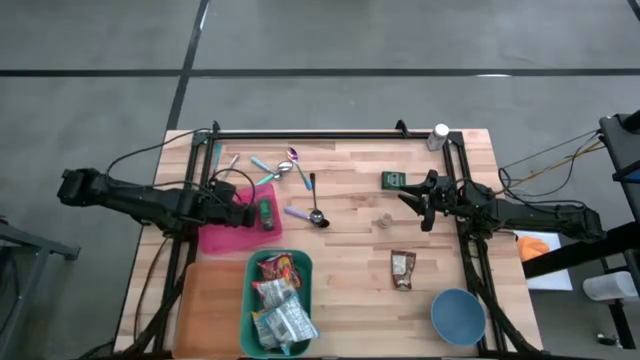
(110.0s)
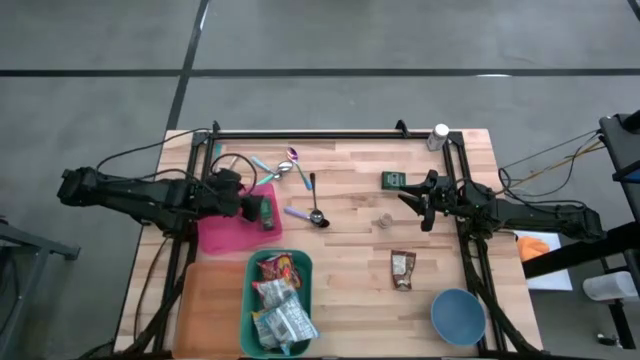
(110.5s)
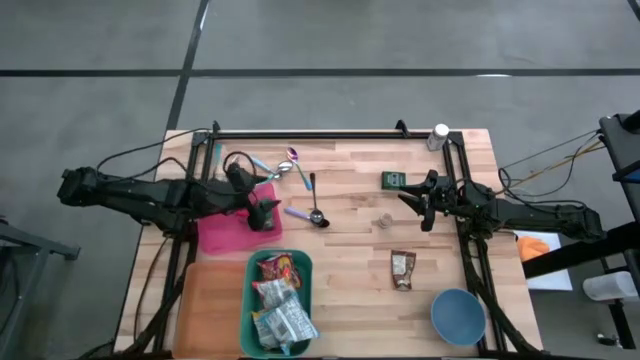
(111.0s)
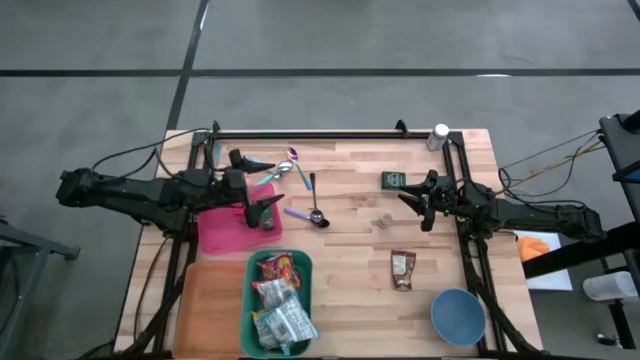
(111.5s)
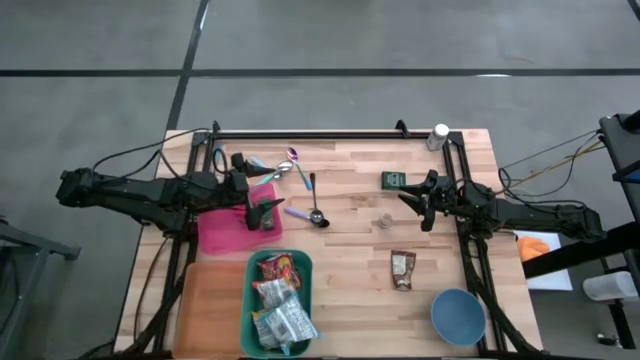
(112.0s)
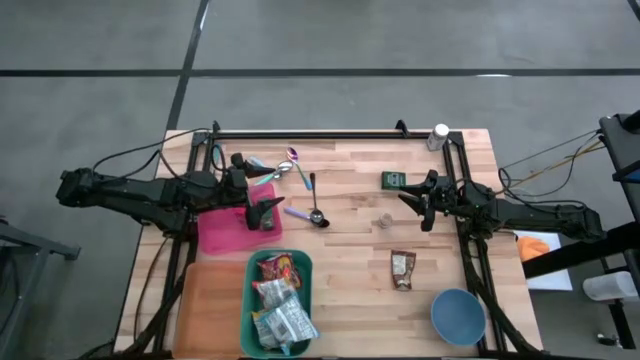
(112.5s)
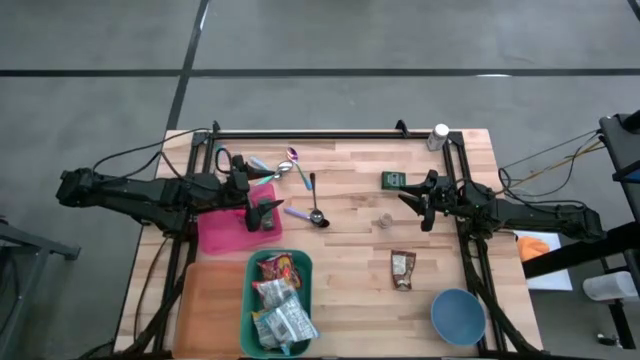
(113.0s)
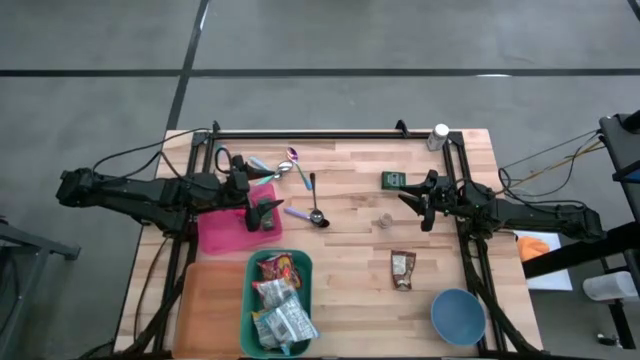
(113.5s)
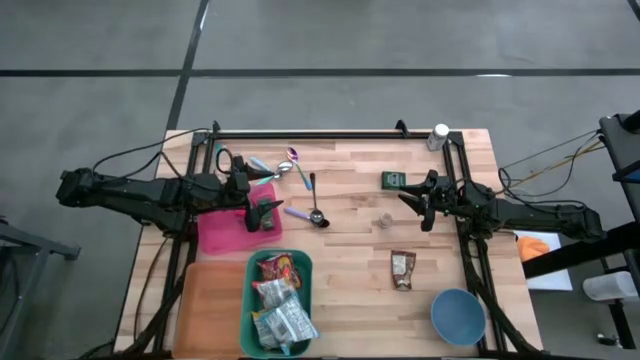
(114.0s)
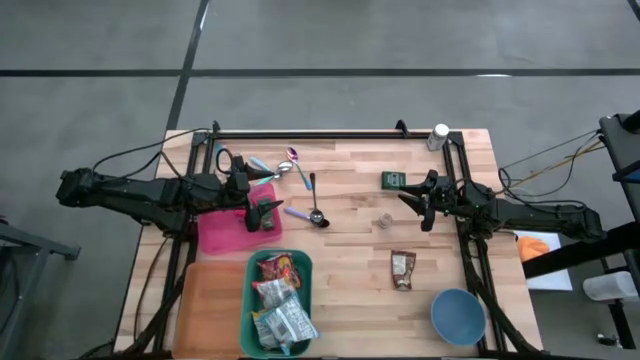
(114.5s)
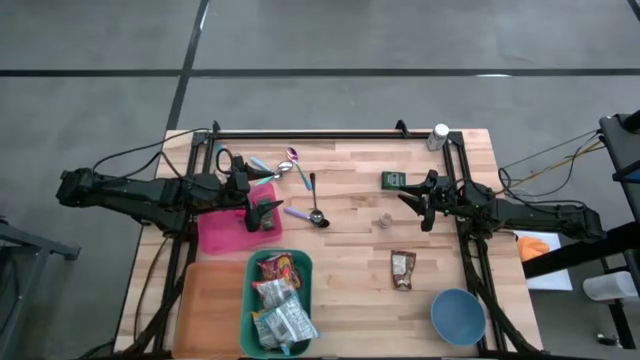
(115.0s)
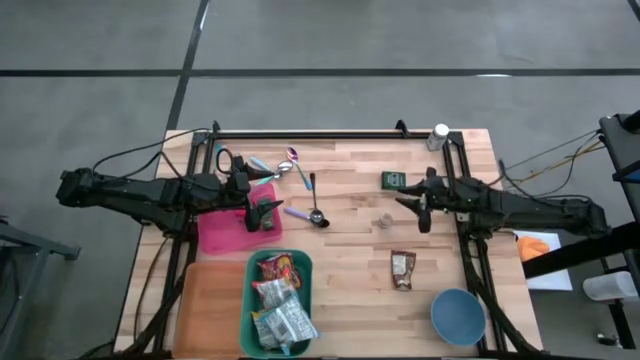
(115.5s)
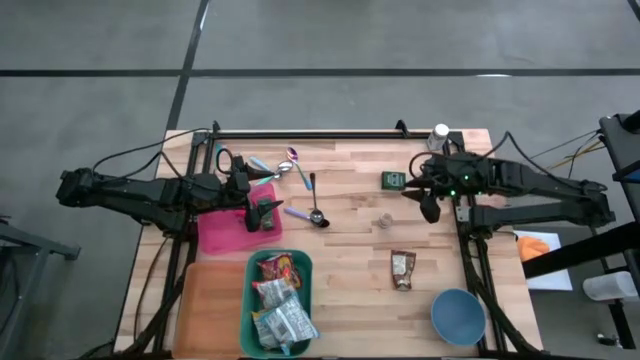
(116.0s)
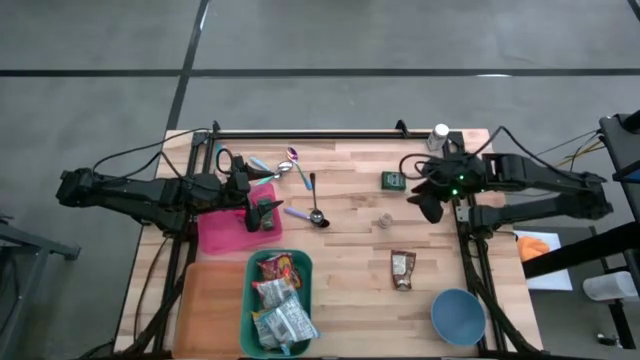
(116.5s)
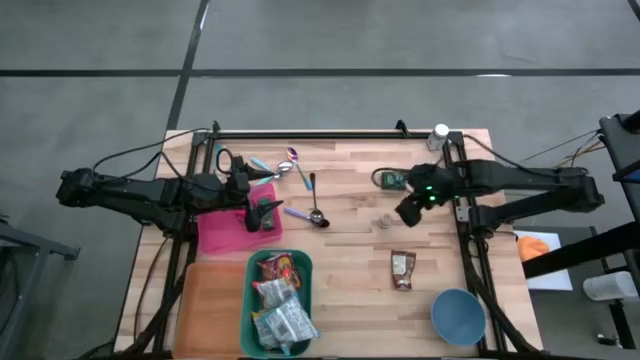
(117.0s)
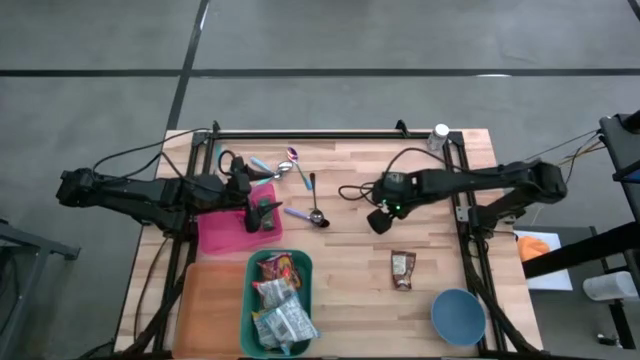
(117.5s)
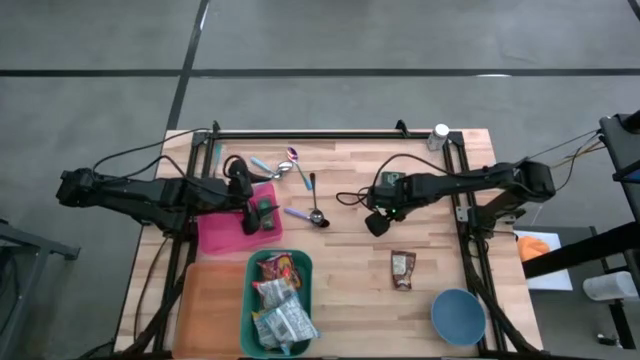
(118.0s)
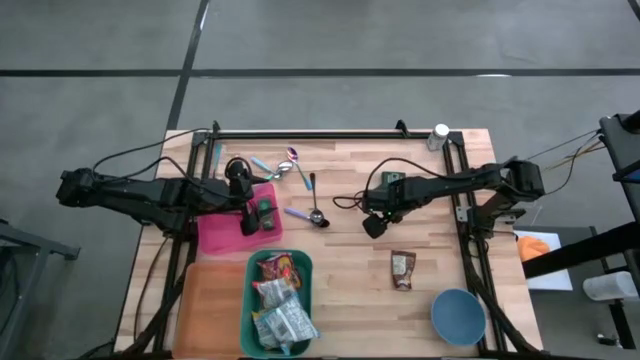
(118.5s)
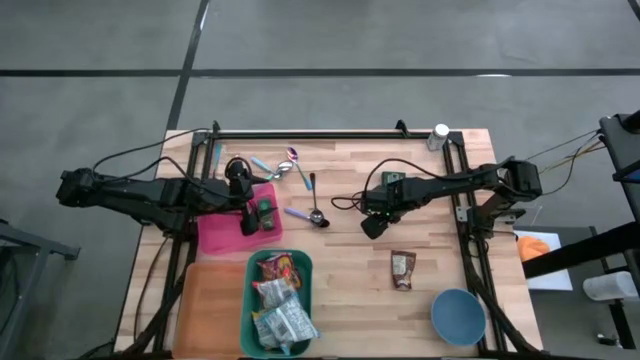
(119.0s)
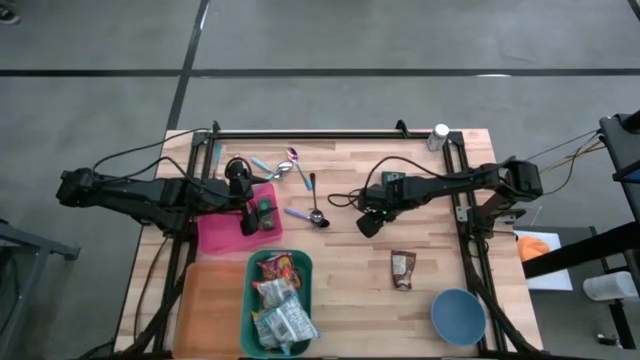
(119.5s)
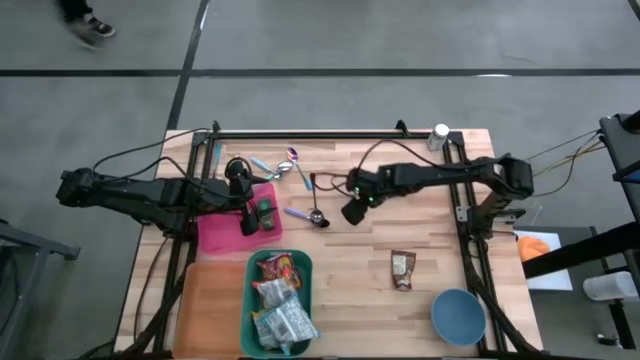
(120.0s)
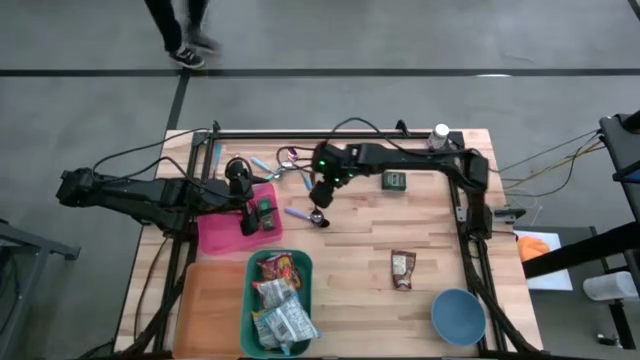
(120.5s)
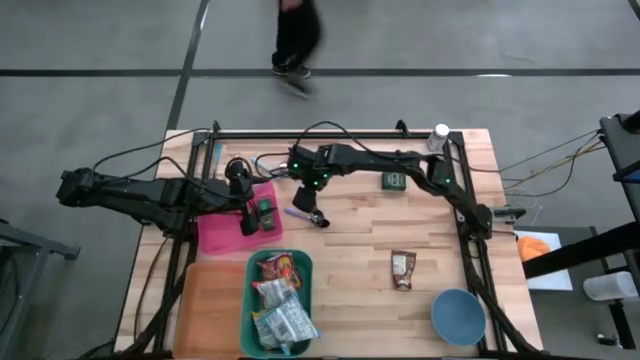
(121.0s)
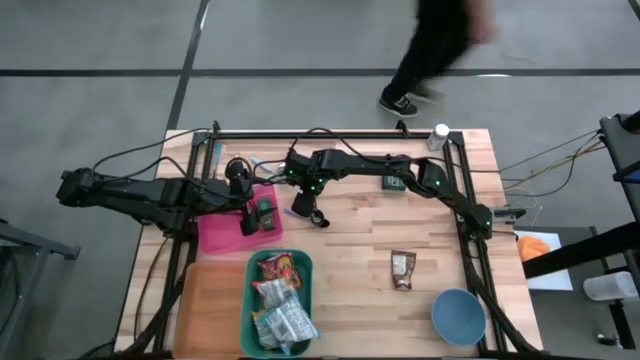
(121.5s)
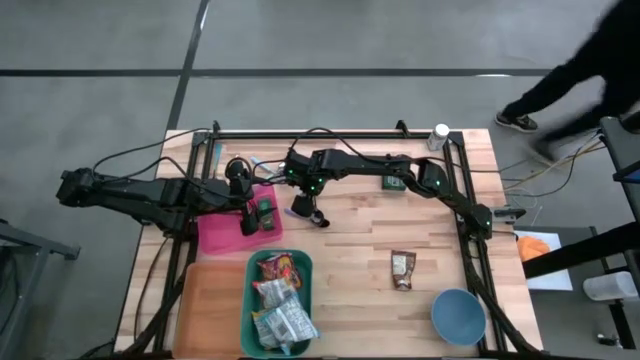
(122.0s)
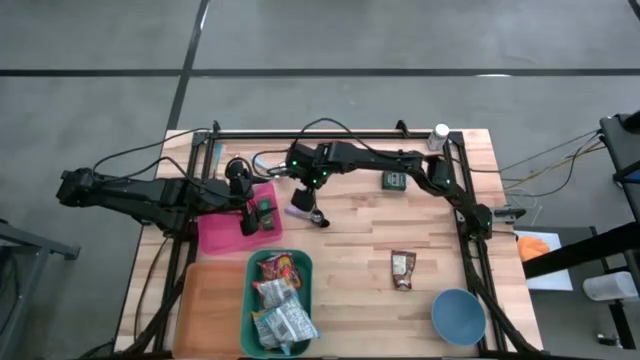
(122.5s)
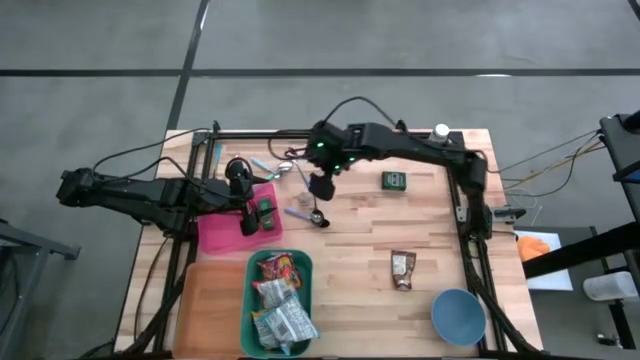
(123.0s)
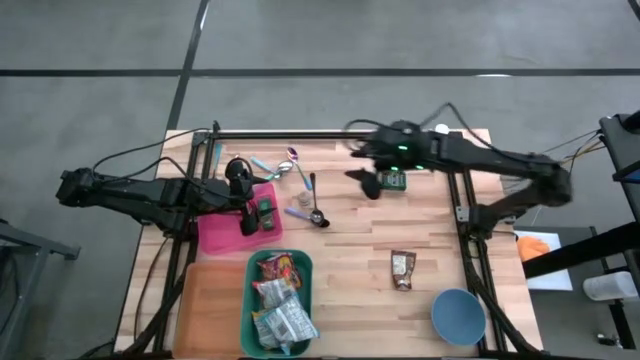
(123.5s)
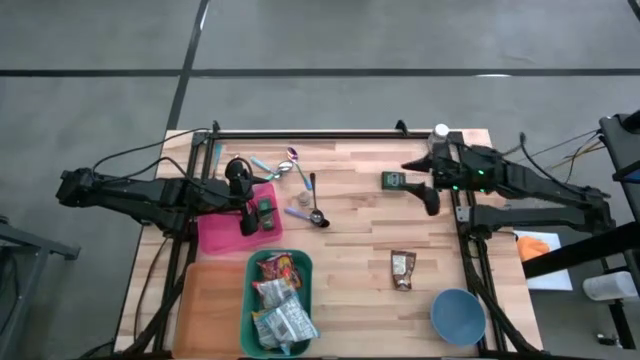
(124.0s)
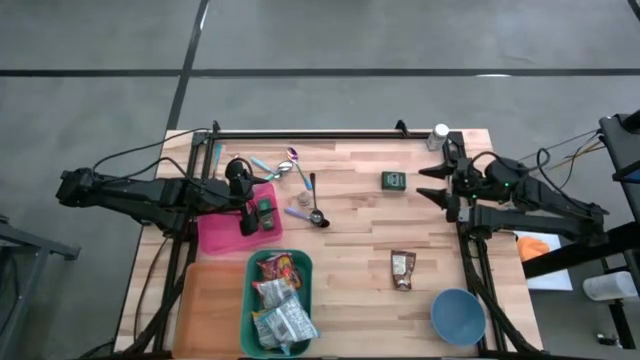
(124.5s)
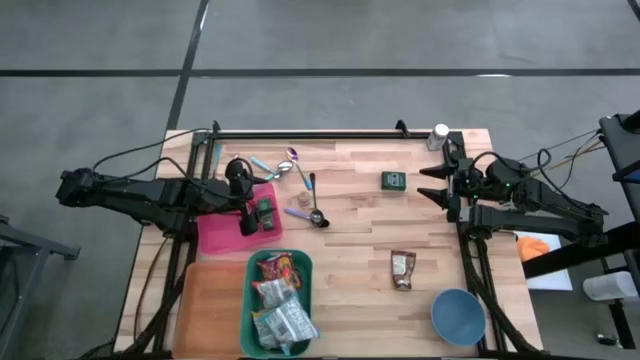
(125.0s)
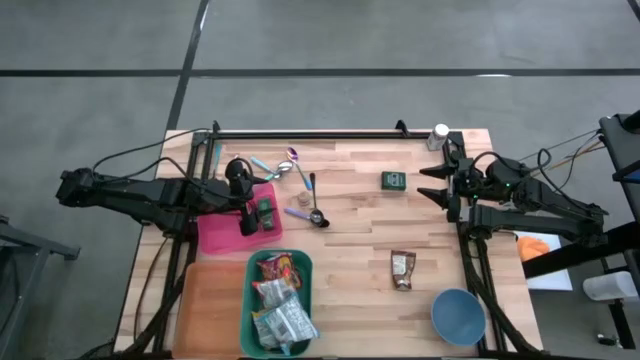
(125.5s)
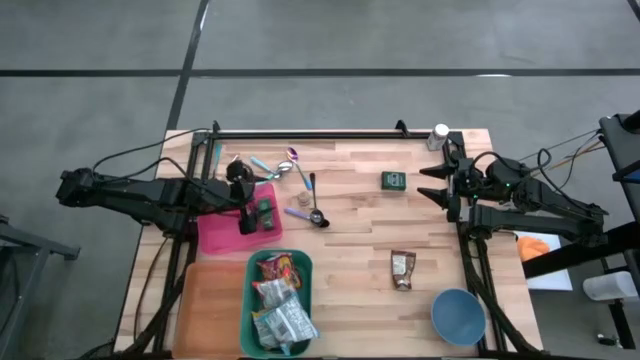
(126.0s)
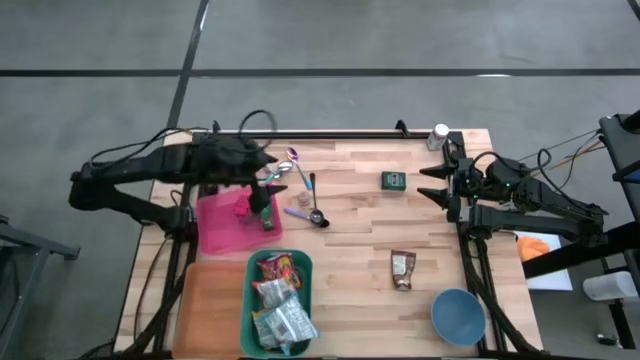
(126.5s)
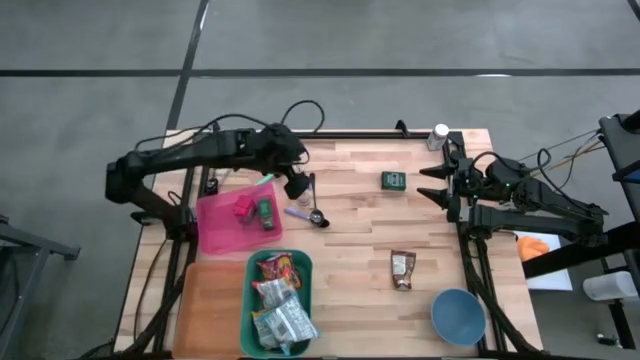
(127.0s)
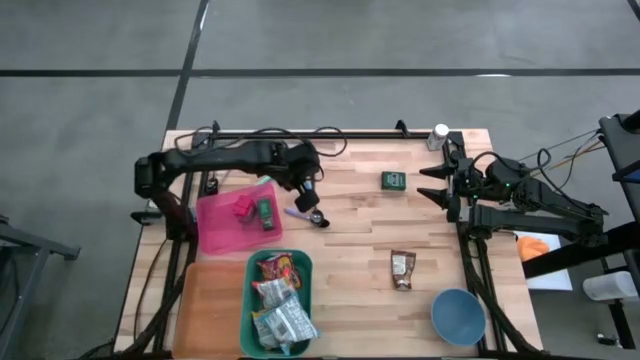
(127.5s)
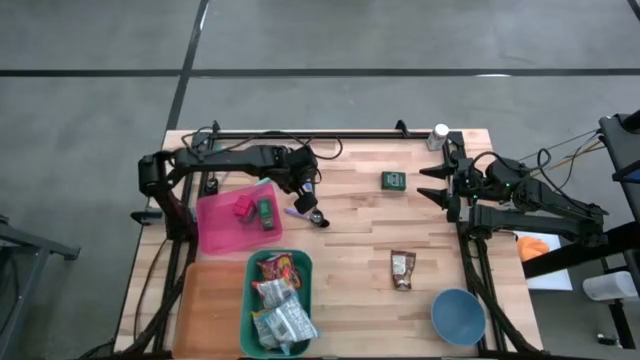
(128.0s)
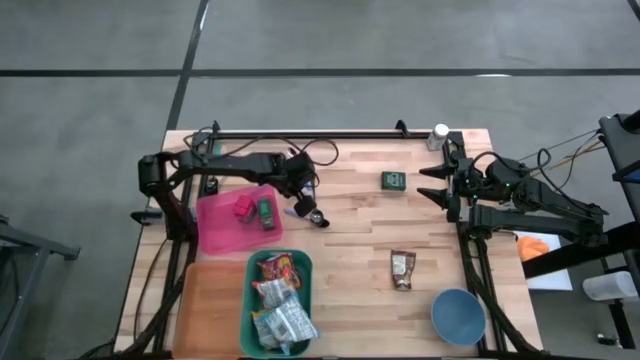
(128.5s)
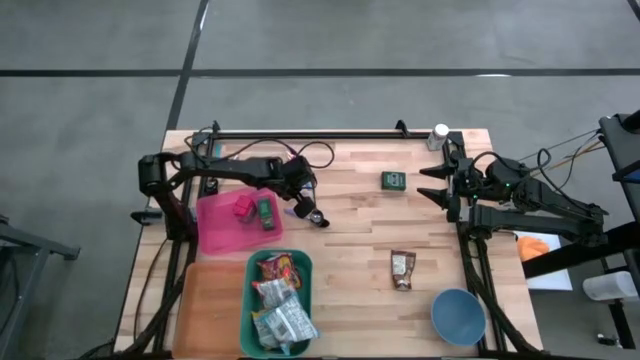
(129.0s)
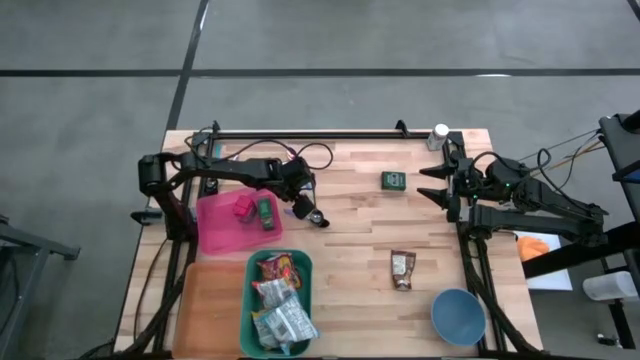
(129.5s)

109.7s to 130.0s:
Put the brown seasoning bottle into the pink bin
